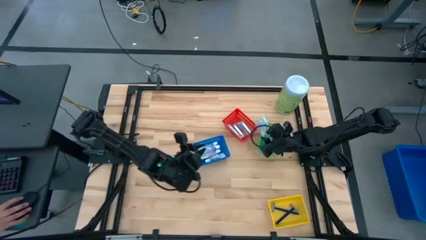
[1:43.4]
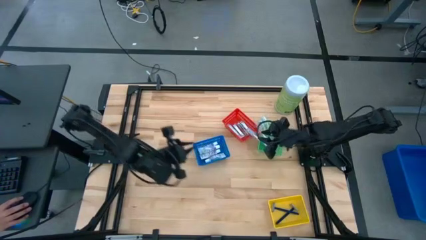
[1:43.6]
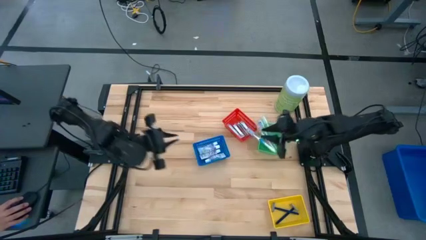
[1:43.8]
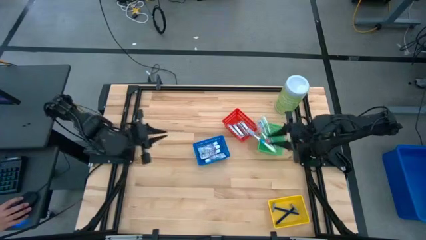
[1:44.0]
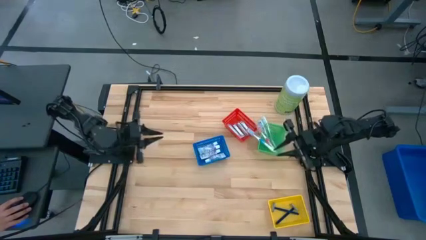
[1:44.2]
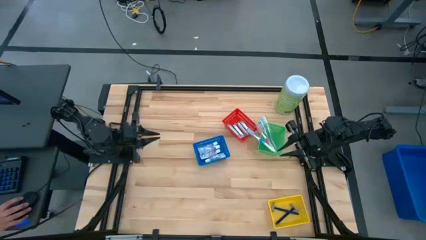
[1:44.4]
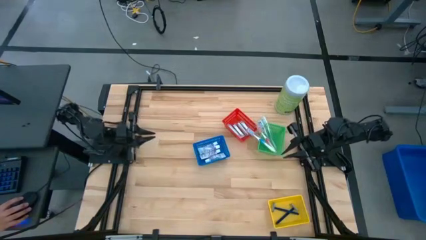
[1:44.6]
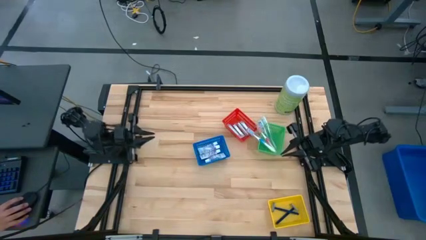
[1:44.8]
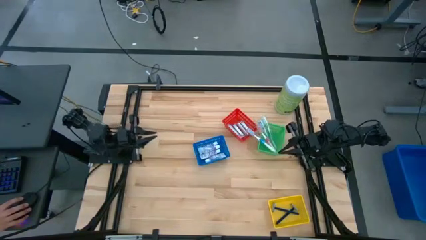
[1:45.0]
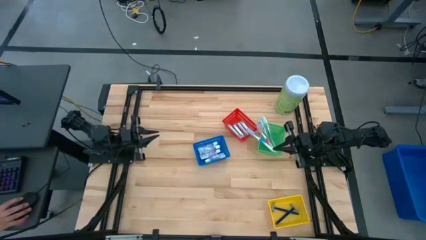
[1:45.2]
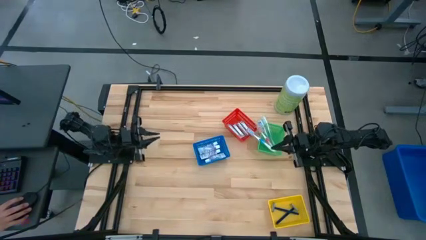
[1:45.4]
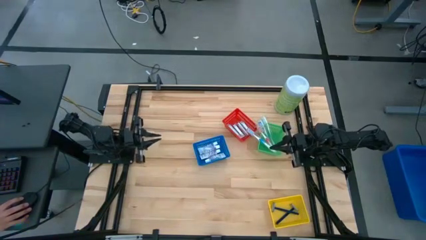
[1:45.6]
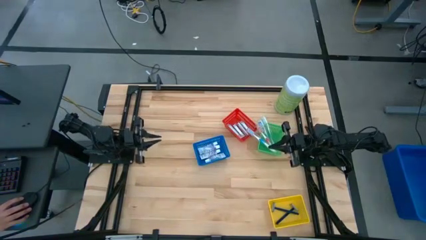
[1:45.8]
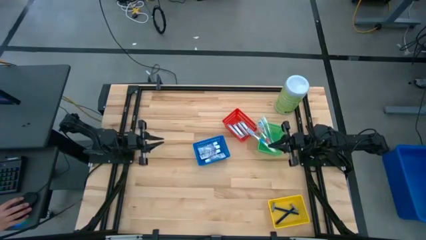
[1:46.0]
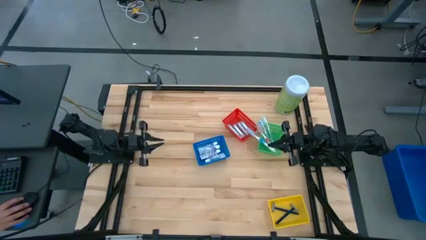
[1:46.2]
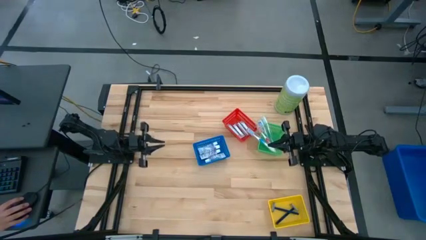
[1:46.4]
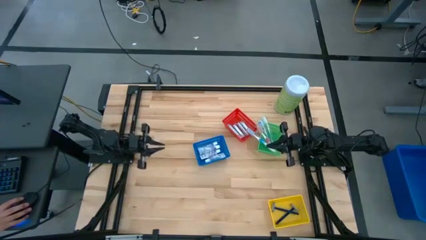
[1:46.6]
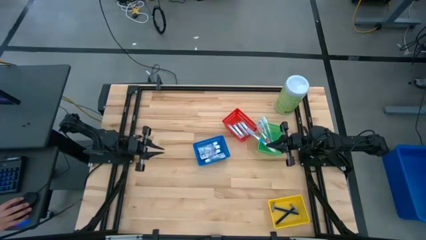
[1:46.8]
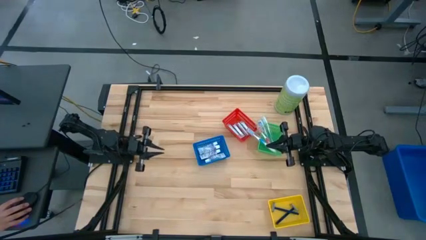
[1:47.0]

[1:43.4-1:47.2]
Task: Pick & Place Travel size toiletries
Return to Home Position

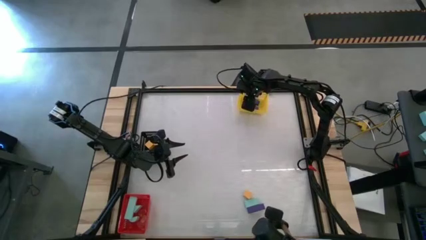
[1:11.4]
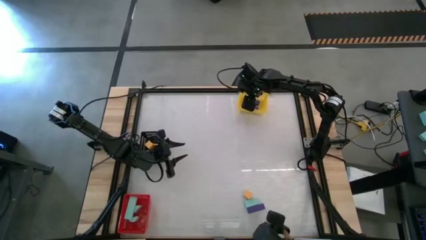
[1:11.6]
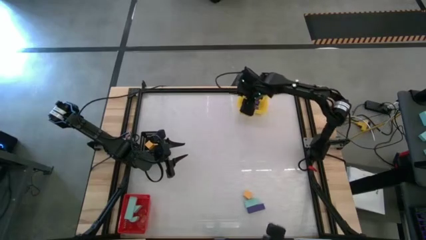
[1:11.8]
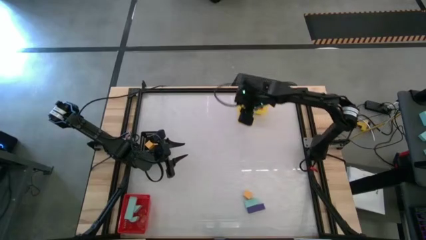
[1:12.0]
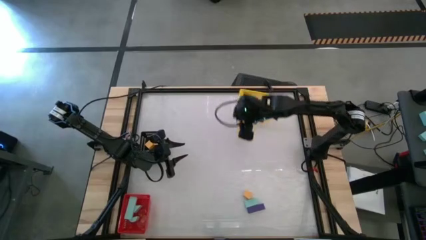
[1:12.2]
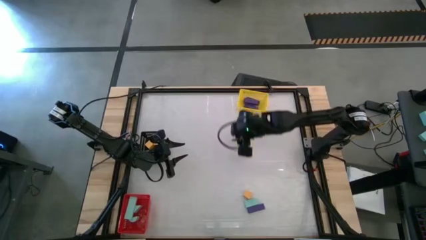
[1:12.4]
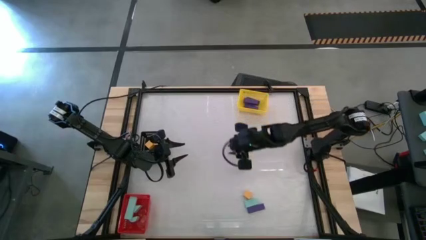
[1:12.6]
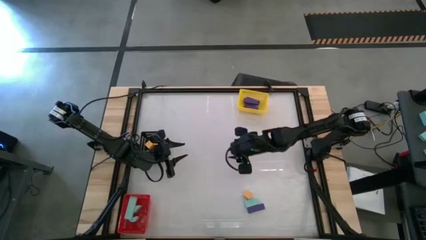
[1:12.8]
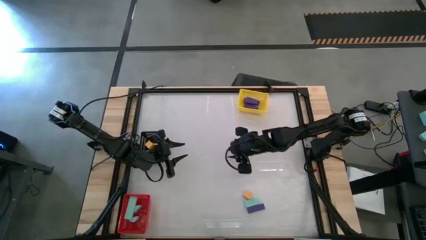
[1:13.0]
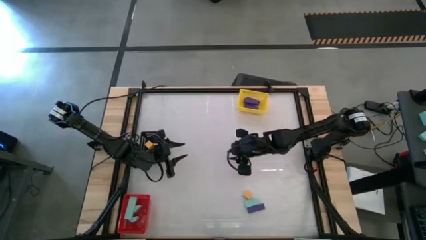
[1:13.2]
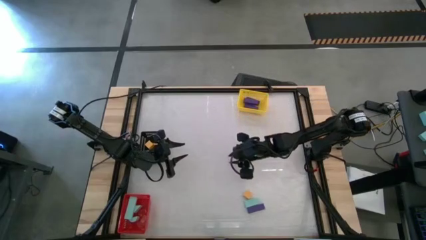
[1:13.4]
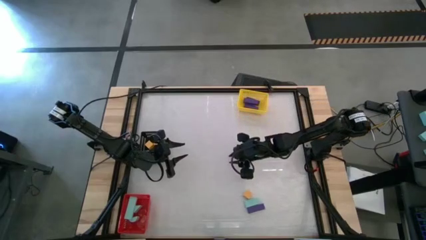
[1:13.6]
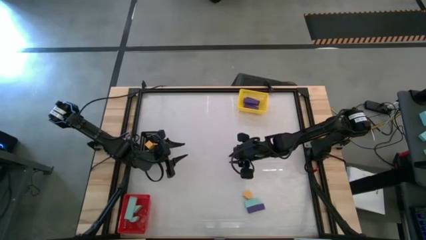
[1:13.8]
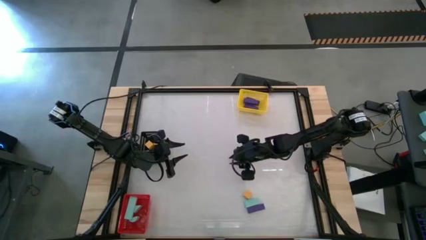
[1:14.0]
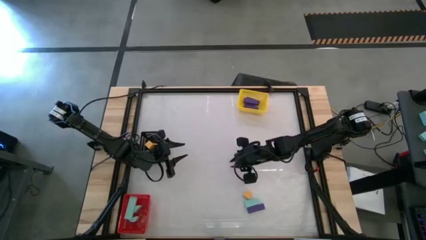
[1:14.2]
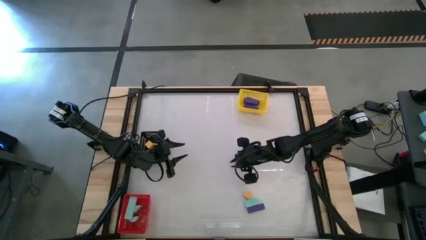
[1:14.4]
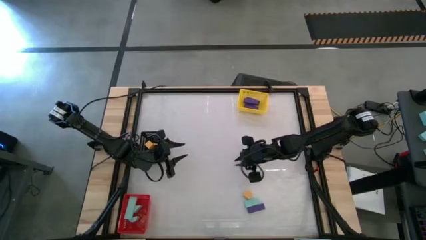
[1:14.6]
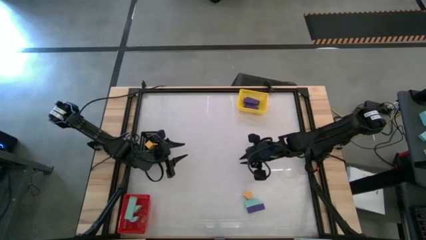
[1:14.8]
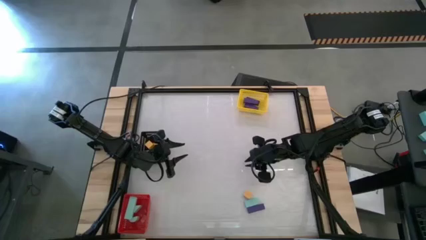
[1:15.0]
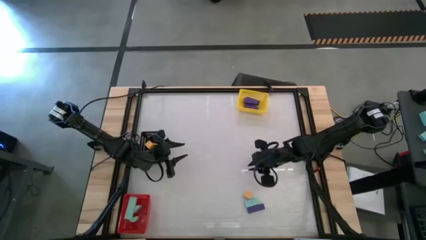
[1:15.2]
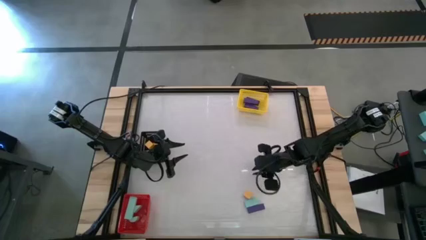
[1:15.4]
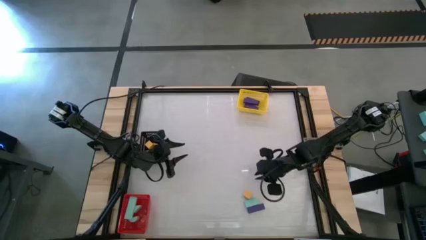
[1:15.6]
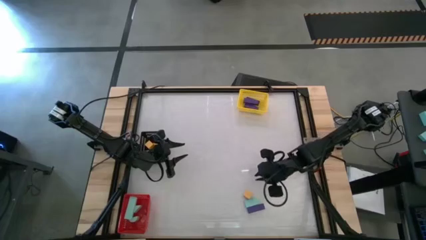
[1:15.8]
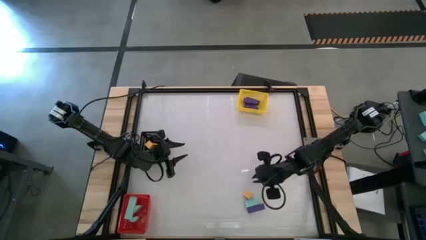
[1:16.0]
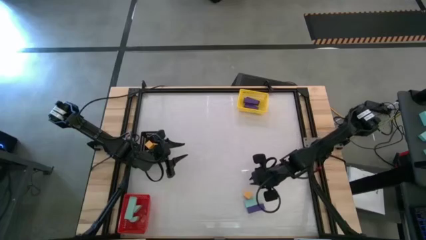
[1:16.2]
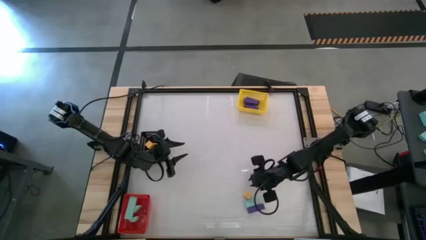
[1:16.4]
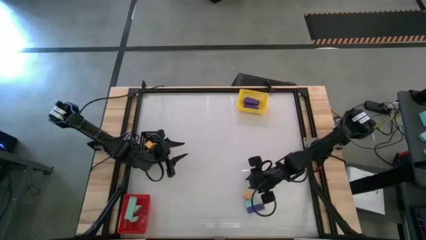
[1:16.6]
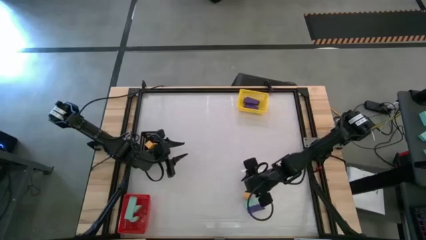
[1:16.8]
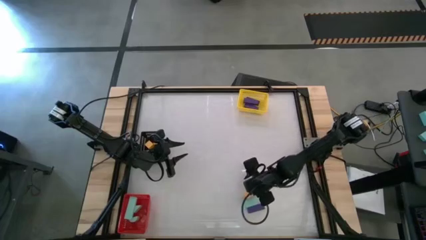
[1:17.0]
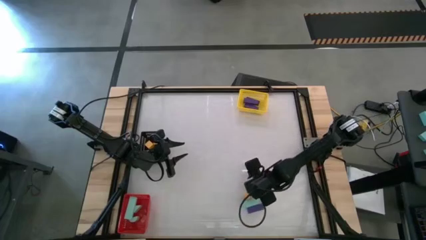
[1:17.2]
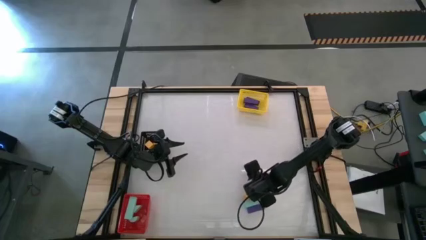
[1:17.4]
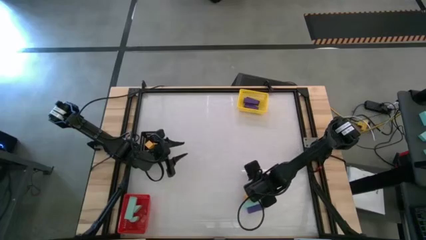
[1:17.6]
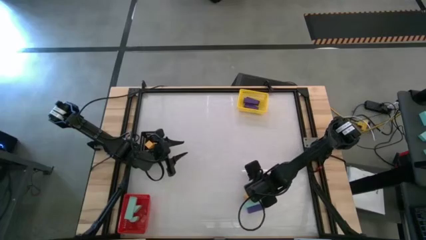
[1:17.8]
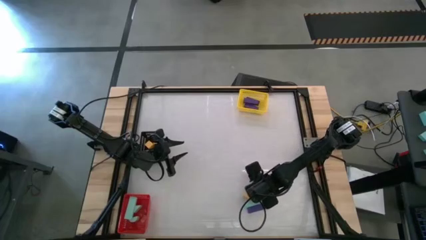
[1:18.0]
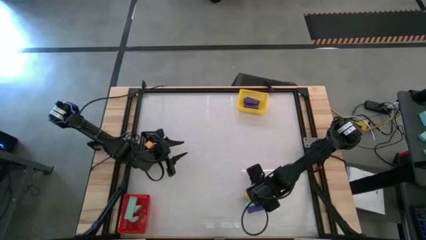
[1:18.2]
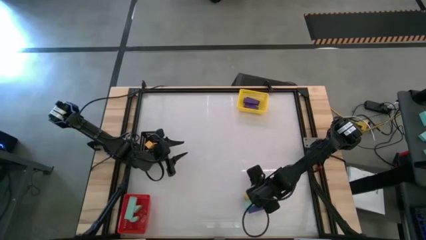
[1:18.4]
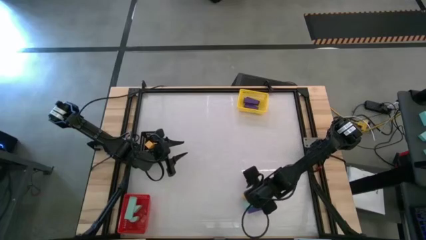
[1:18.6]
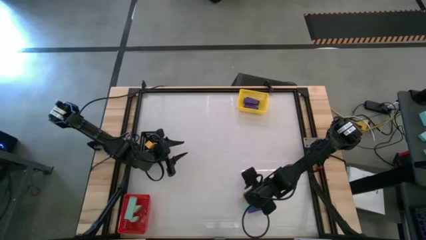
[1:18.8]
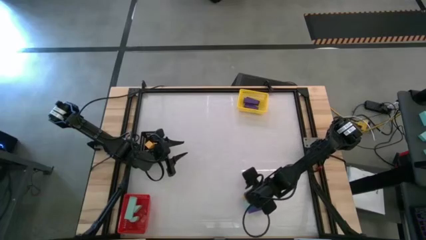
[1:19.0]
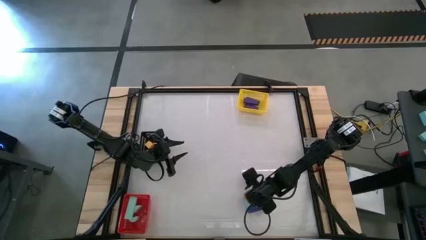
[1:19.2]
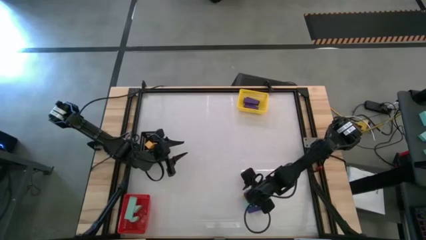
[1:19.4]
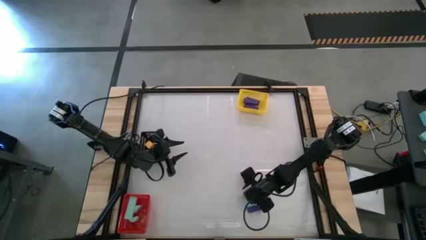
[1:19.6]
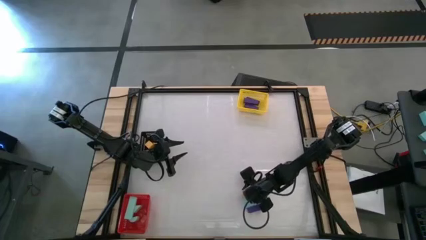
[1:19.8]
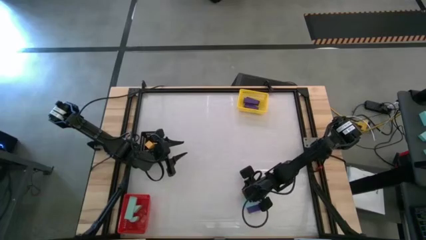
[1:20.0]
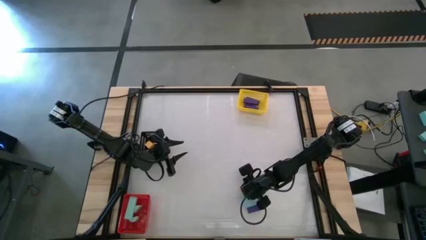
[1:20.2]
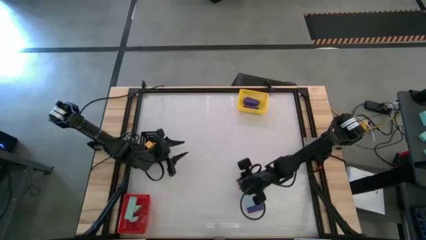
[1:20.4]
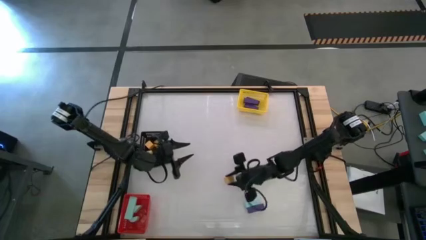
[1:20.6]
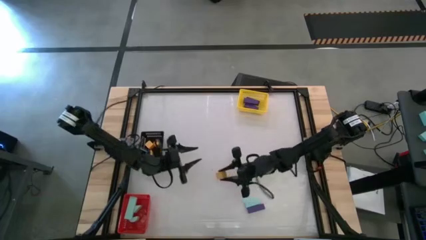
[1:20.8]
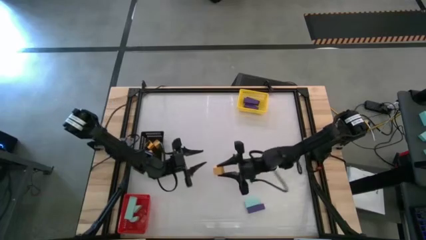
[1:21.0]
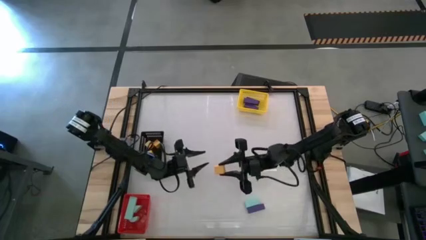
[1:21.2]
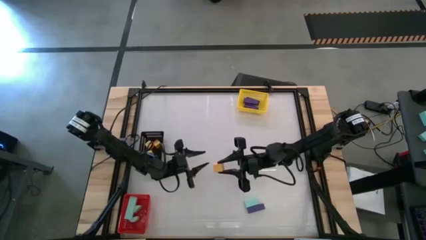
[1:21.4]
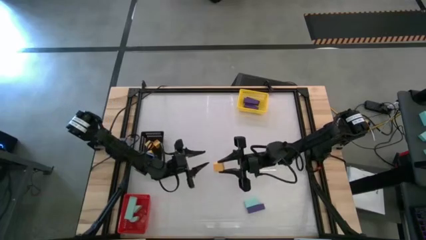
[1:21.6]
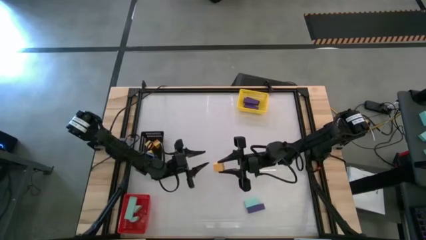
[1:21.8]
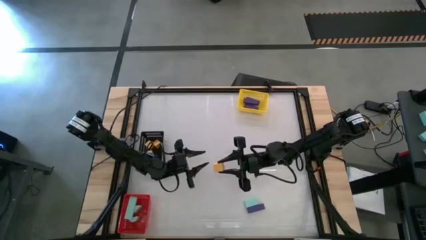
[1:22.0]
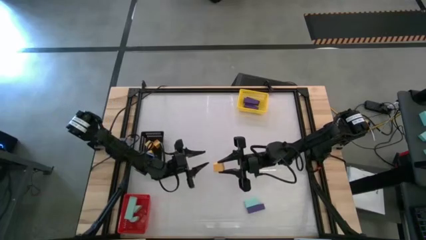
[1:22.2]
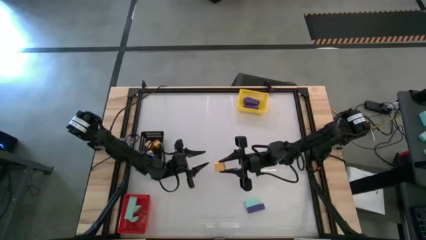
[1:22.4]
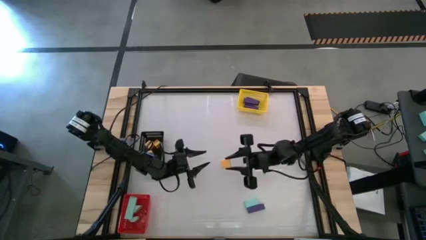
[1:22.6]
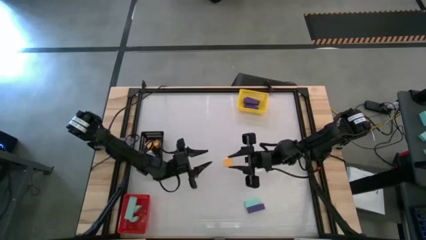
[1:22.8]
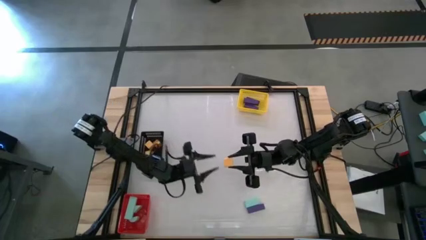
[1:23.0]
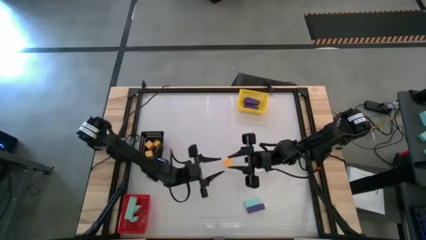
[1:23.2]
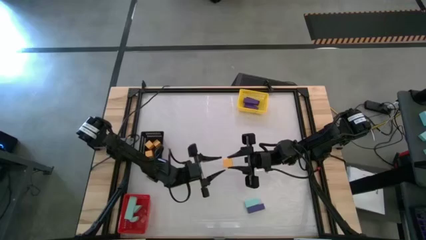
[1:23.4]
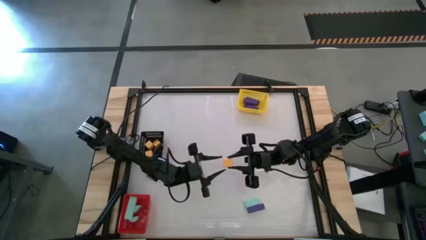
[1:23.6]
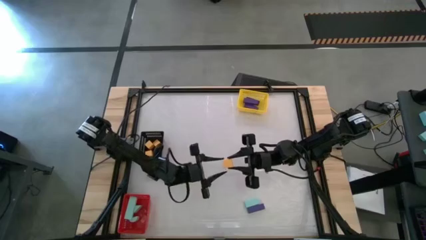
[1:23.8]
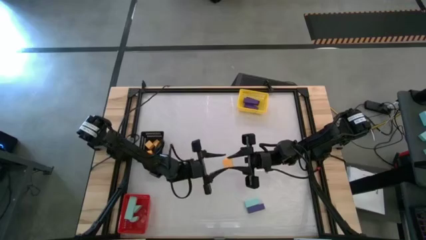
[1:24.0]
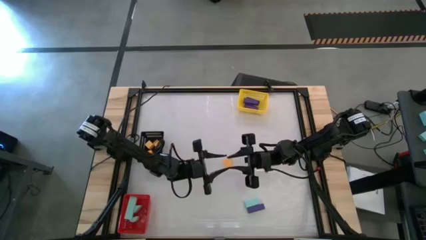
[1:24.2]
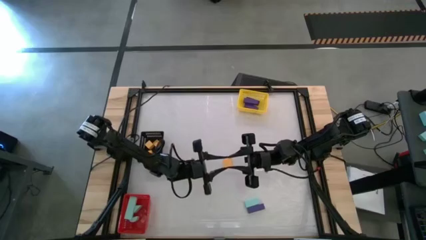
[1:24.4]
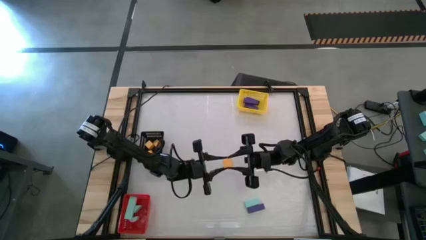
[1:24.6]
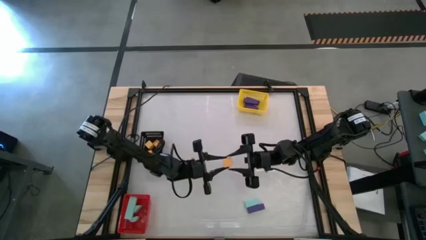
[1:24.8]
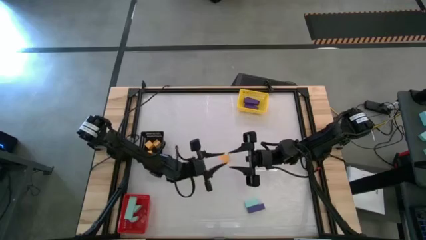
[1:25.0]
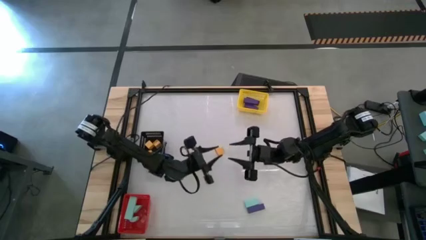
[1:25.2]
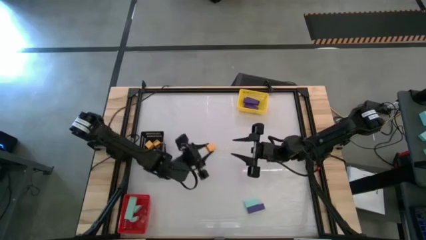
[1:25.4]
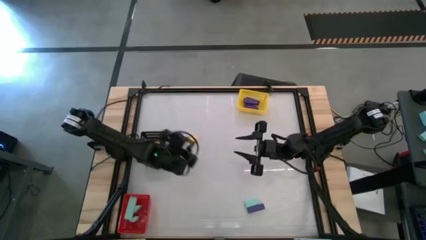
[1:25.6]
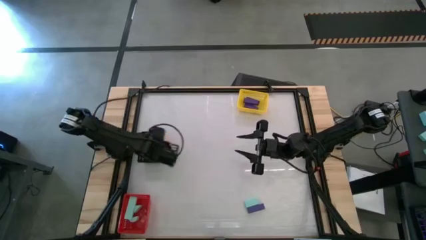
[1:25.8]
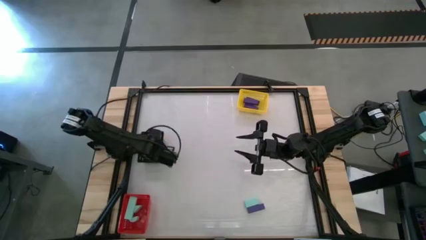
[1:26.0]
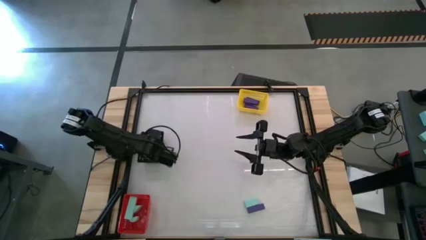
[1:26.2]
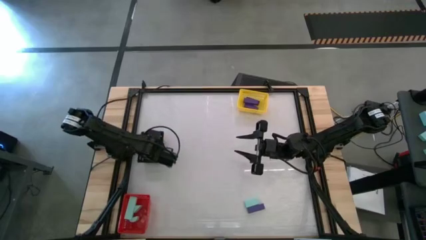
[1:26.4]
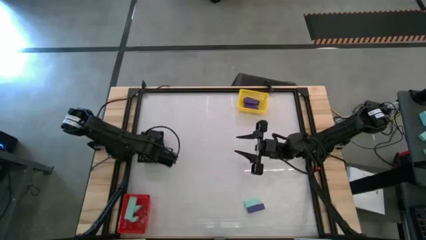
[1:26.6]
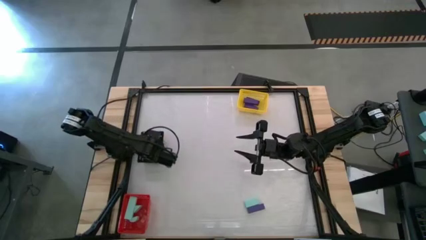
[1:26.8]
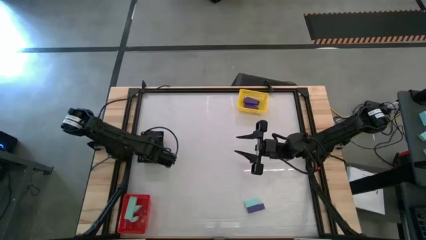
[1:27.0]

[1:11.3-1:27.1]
Task: Sort & place blocks by color
Put the yellow block into the black bin
